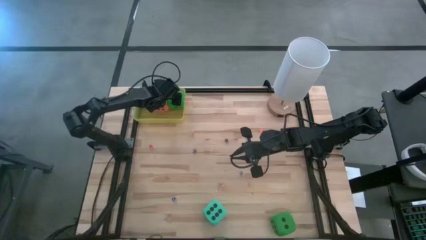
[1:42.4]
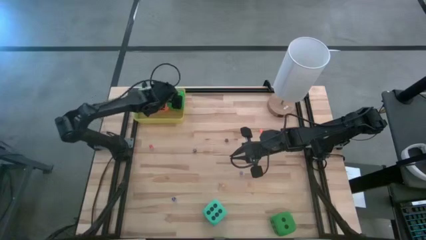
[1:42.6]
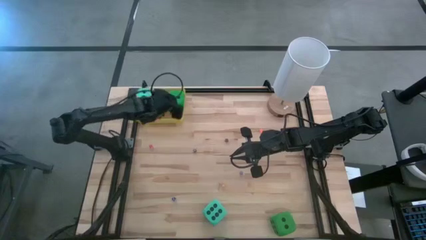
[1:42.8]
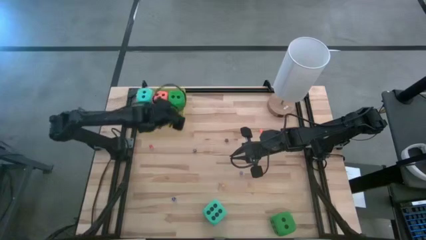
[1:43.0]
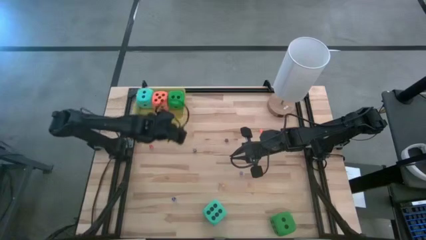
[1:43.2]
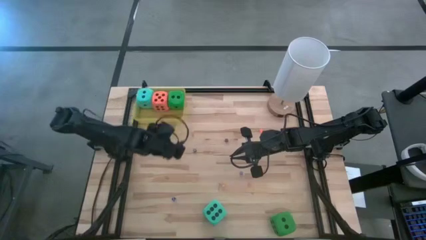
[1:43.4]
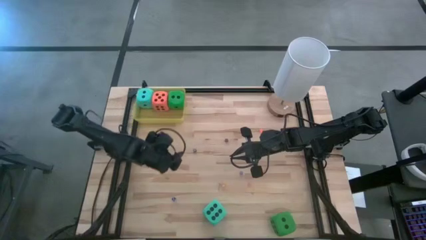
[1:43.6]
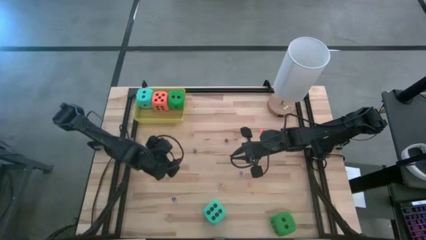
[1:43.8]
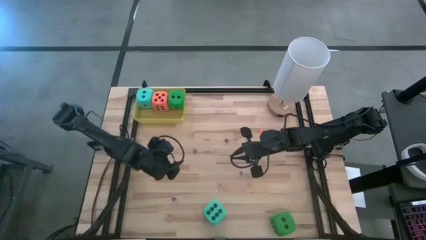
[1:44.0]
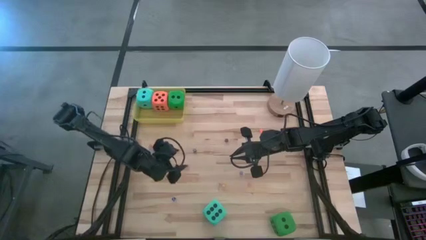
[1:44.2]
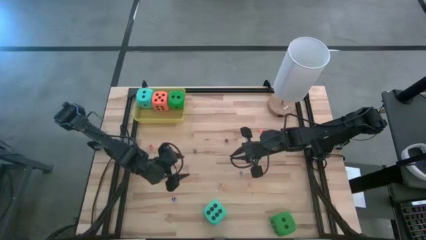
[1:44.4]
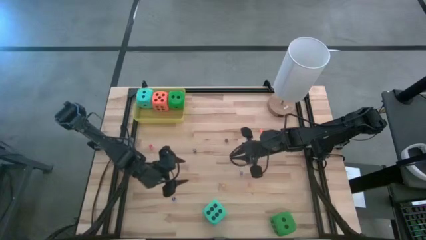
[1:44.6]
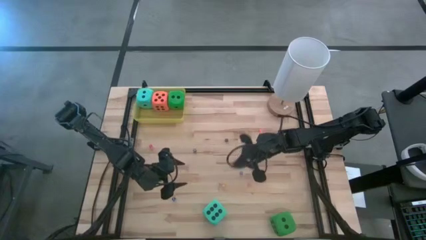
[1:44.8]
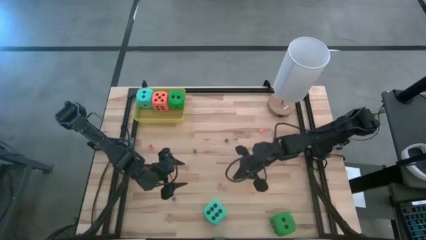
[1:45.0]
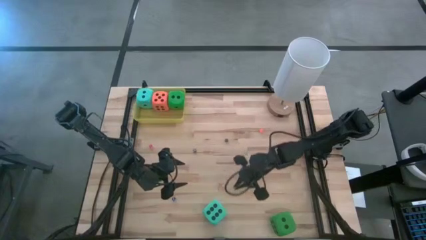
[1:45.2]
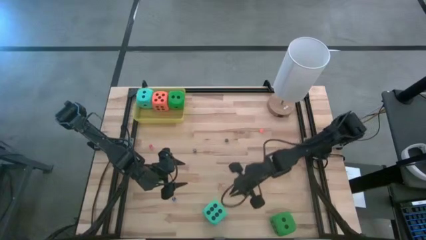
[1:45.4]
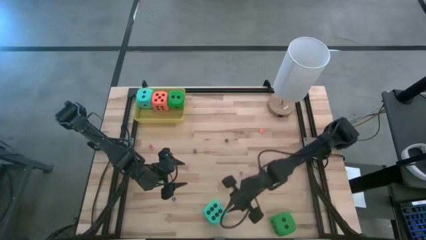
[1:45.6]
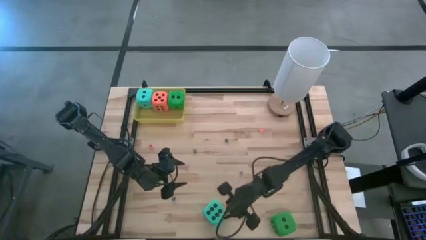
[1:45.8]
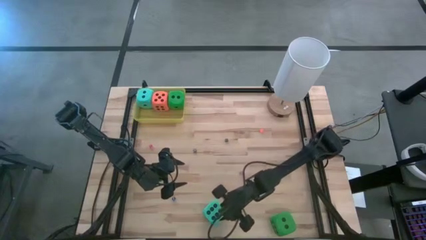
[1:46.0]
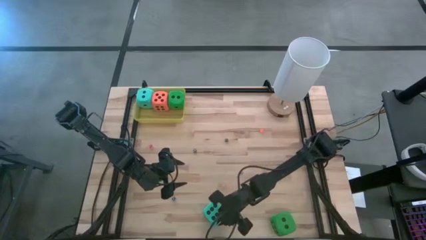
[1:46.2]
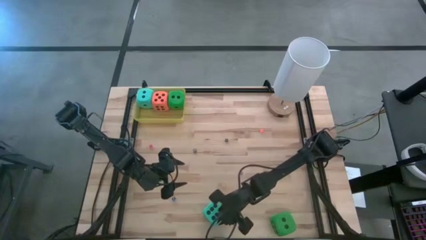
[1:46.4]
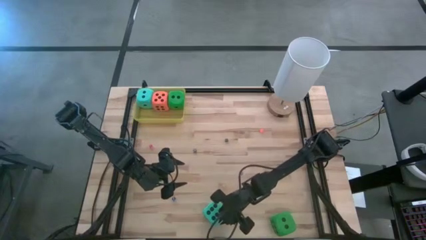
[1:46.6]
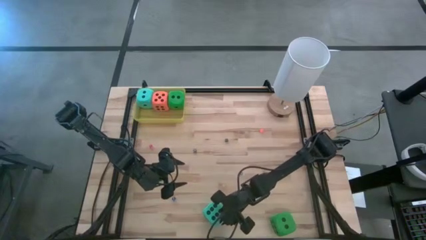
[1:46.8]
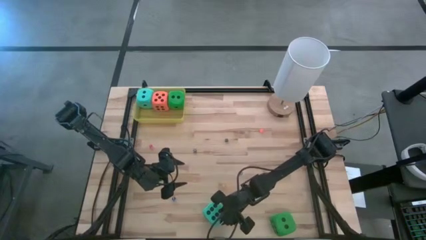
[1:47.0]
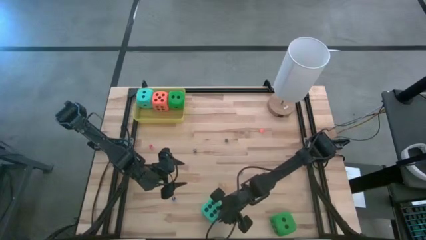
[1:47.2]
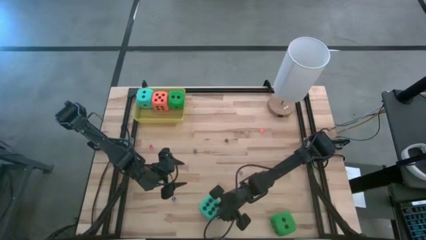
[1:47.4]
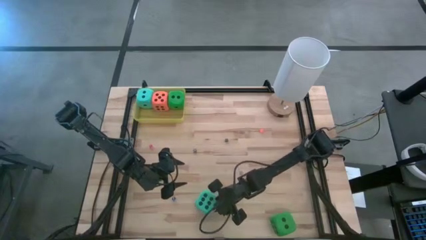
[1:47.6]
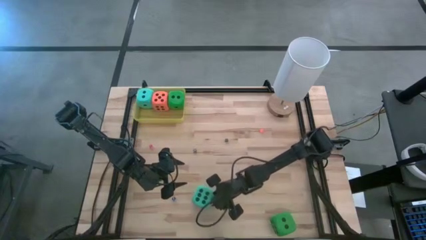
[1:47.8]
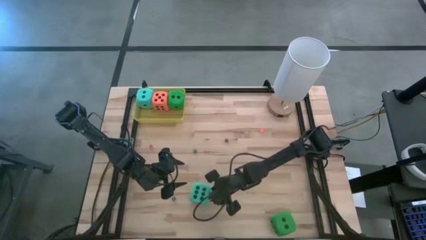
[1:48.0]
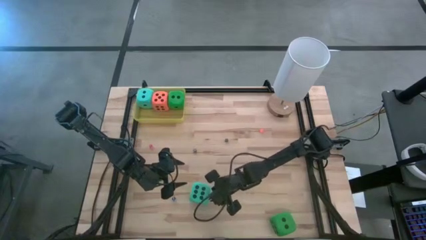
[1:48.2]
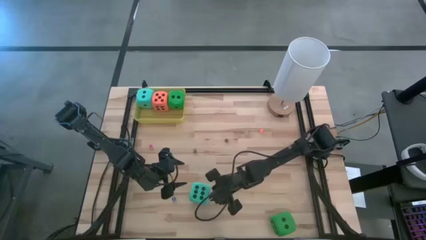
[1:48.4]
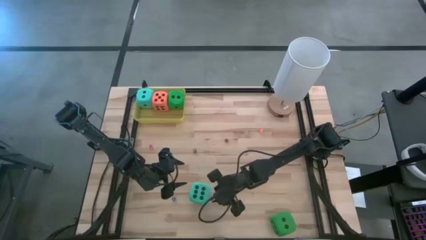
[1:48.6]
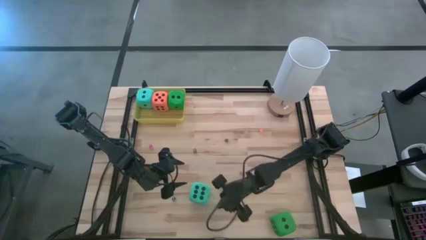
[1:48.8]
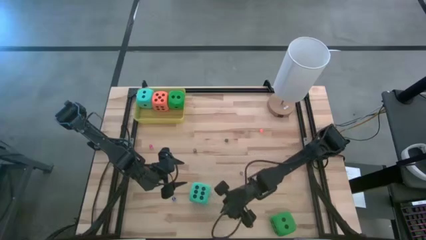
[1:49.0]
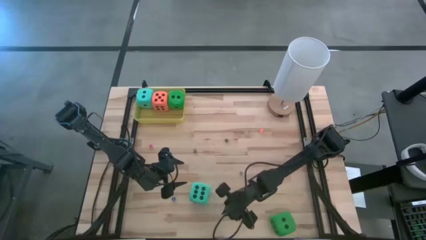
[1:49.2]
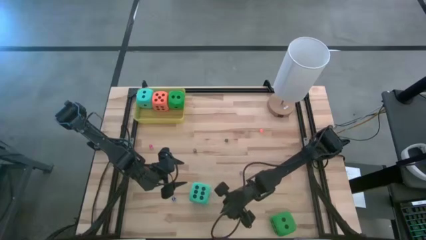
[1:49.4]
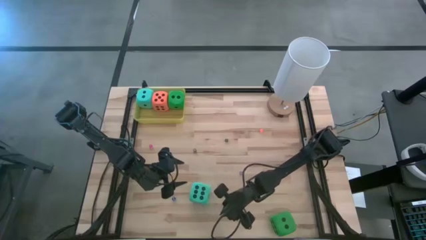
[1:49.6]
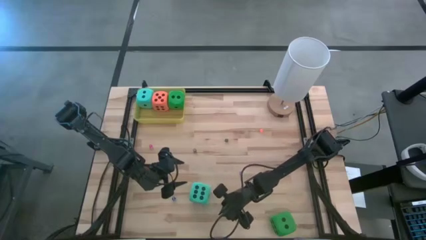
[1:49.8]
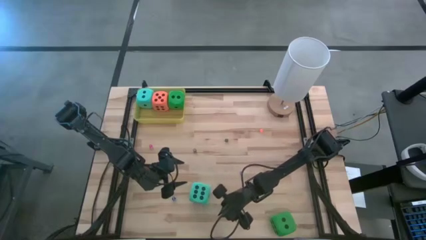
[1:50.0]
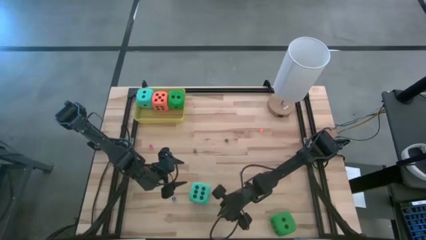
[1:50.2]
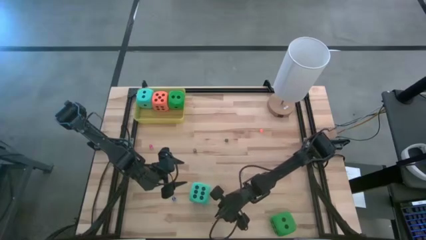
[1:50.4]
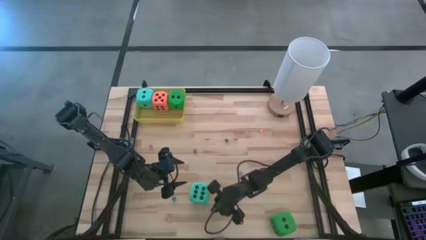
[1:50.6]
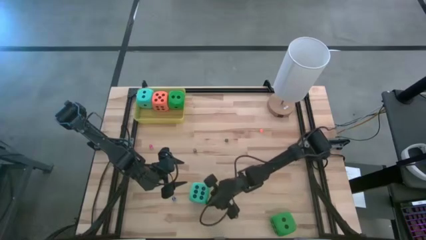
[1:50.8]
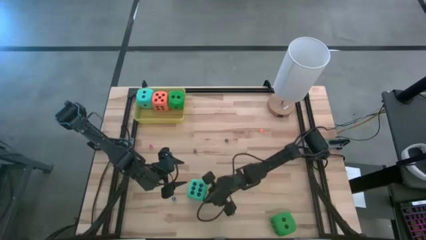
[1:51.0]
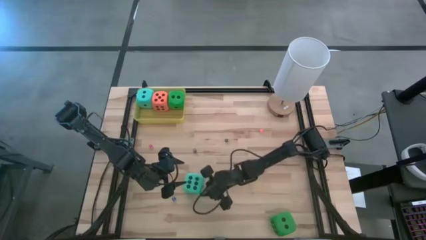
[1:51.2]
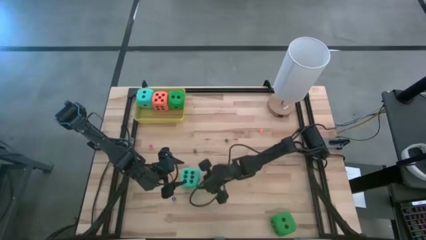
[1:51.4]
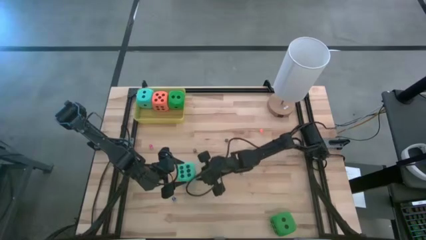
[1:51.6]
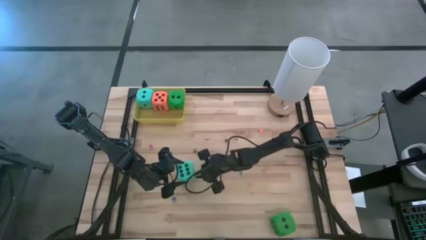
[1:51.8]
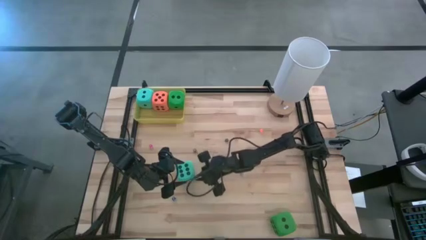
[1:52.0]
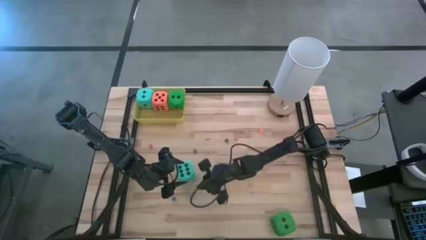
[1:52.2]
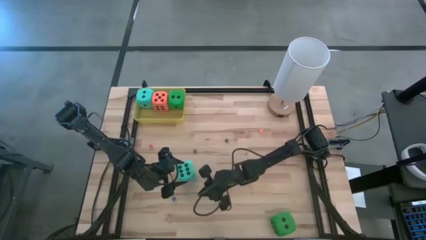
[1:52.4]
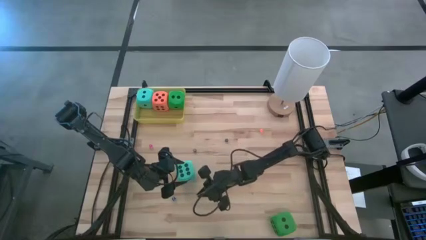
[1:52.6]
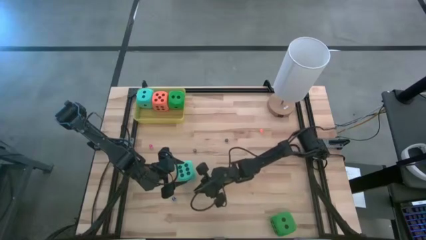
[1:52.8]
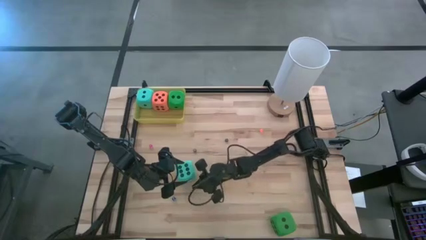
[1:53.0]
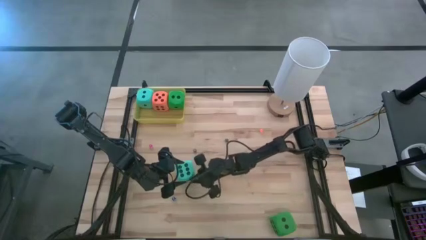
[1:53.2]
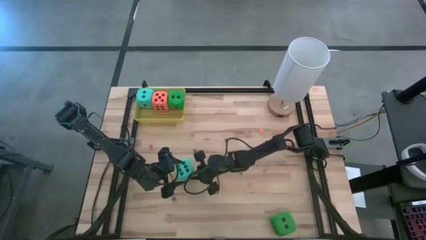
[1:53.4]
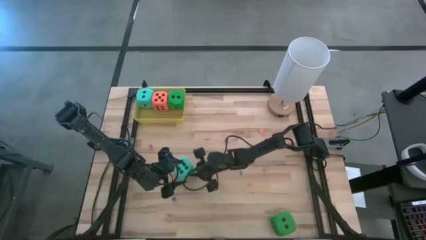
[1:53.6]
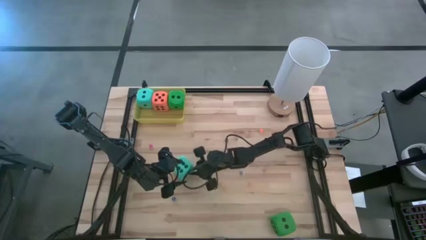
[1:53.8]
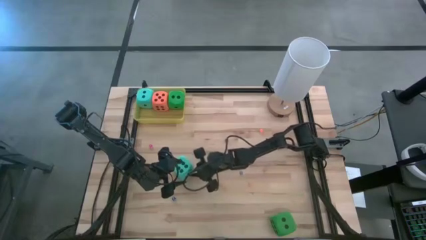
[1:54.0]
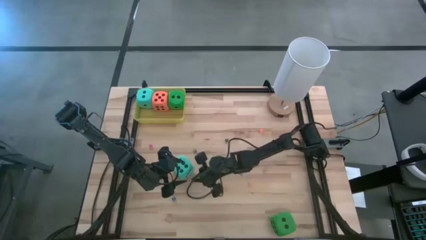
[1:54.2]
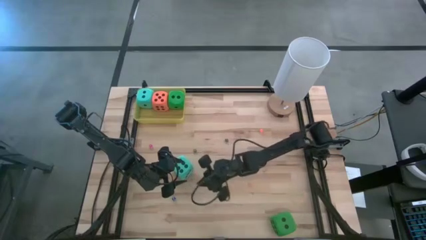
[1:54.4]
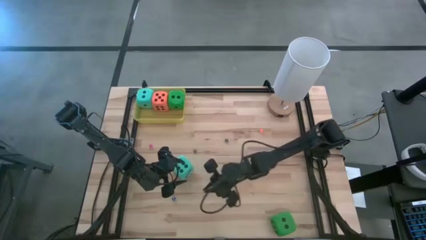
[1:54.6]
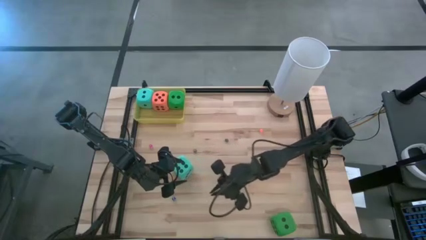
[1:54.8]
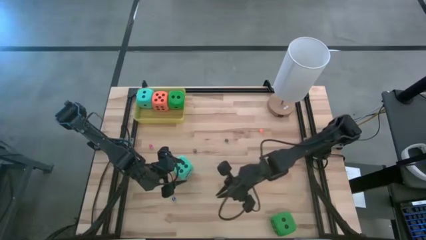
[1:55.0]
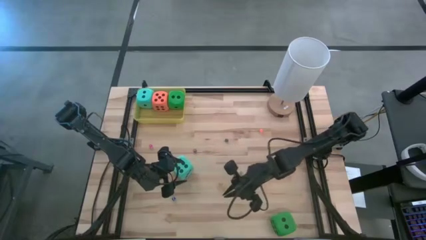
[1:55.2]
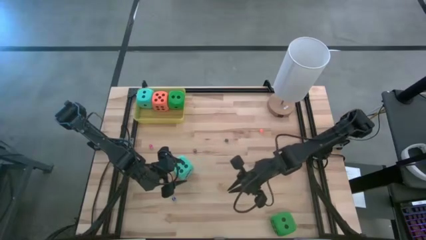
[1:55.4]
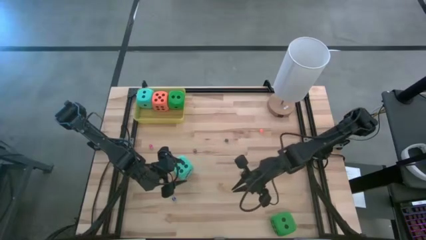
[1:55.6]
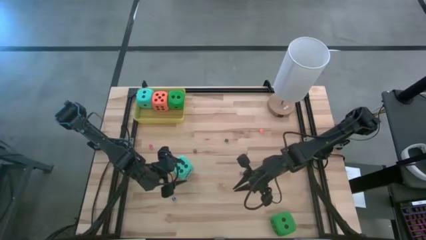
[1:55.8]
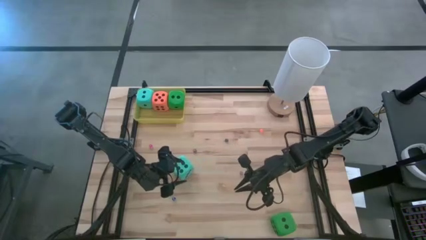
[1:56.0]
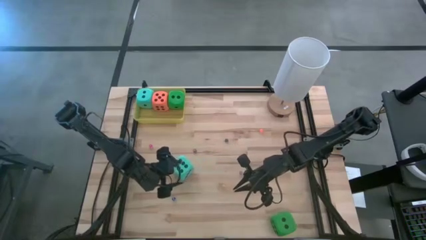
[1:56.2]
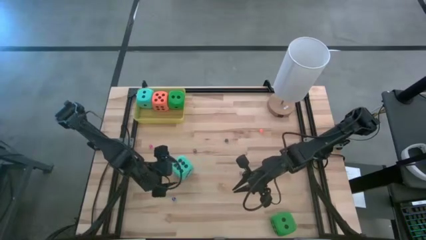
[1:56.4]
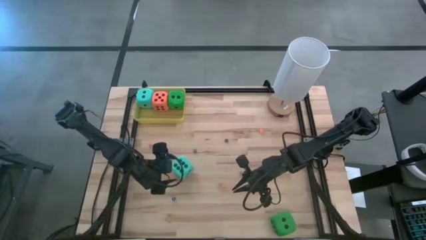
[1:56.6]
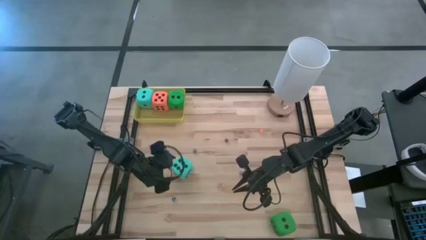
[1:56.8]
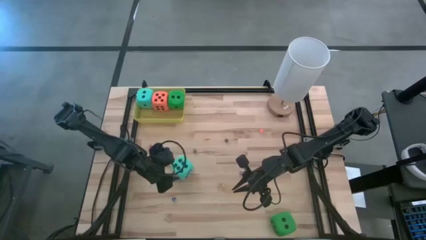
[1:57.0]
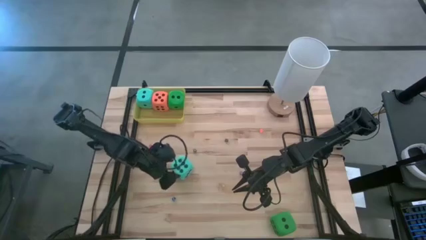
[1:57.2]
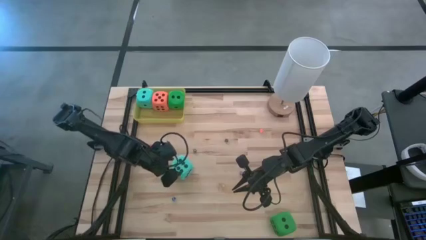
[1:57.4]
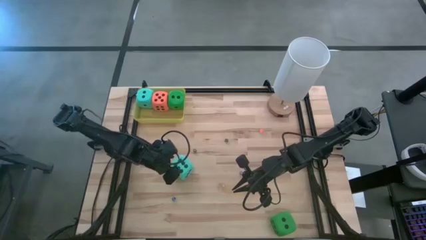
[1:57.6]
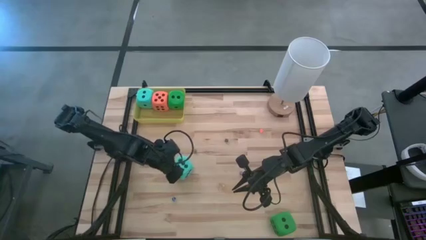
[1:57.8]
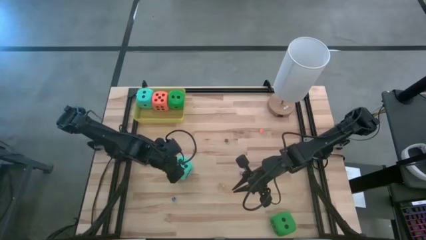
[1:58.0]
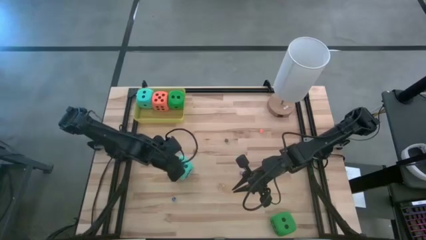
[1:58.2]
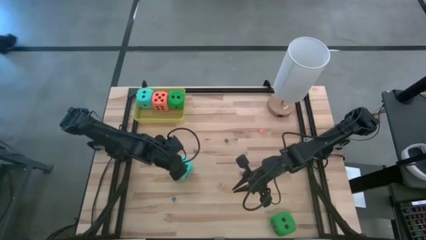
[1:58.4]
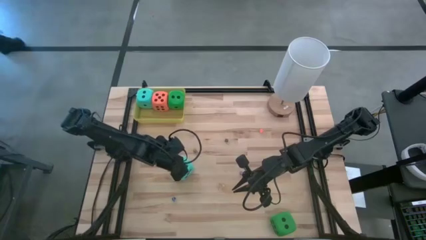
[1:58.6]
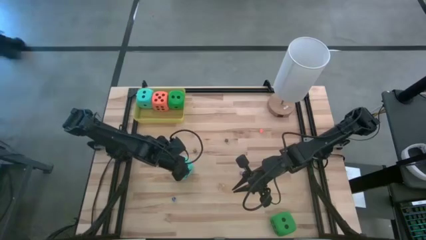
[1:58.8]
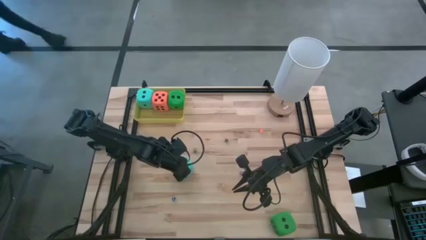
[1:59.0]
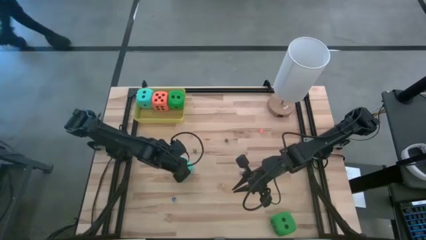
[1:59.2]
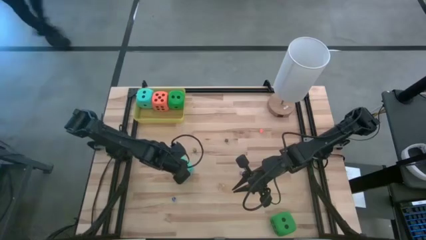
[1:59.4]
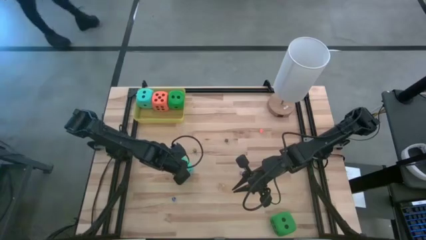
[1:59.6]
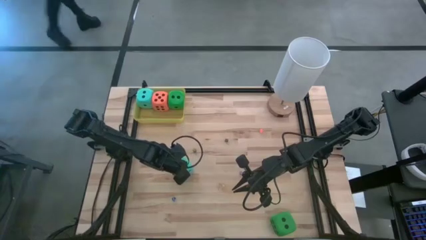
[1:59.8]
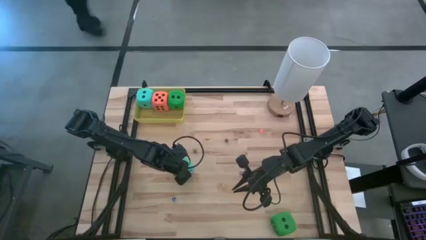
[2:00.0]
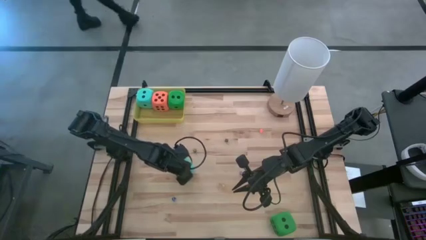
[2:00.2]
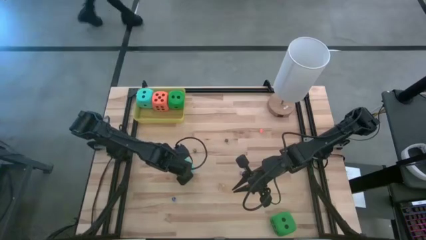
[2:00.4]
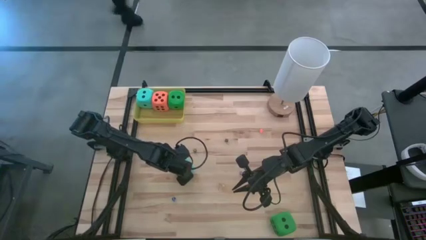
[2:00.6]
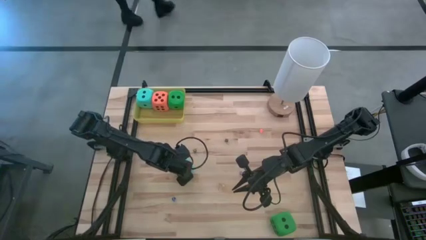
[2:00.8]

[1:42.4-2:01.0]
Task: Pick & Place Dice
Put the blue large die into the yellow container
